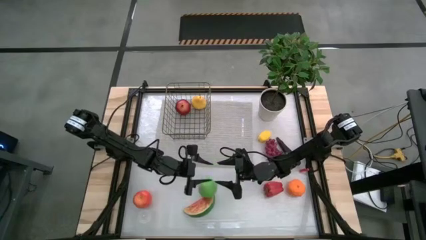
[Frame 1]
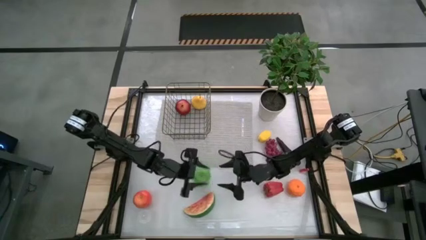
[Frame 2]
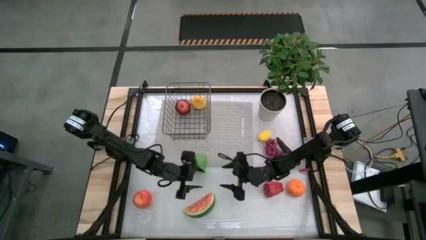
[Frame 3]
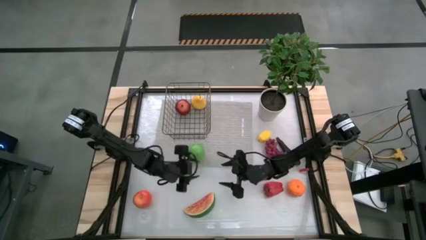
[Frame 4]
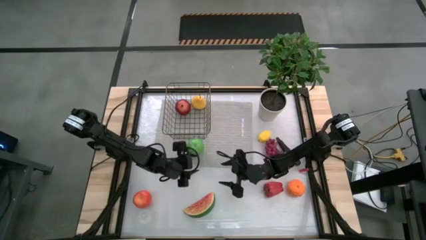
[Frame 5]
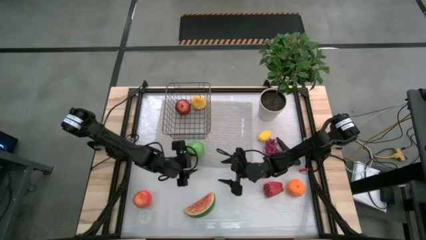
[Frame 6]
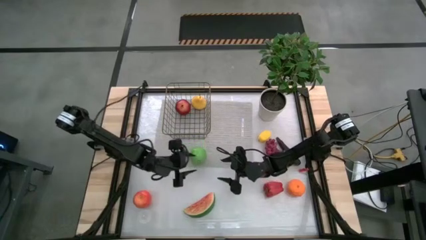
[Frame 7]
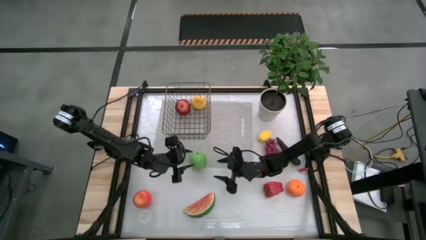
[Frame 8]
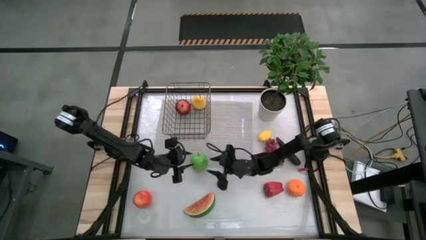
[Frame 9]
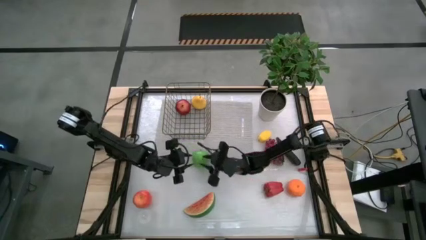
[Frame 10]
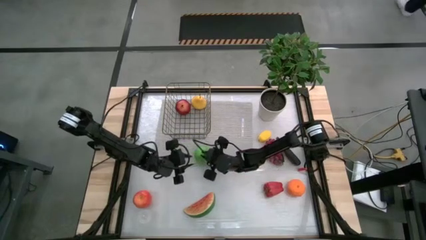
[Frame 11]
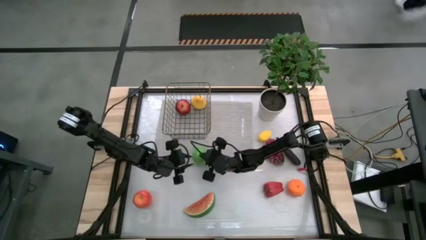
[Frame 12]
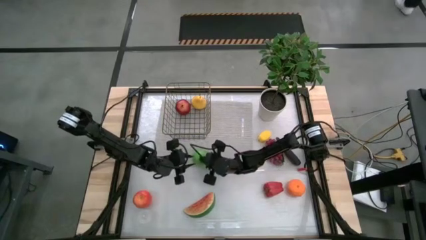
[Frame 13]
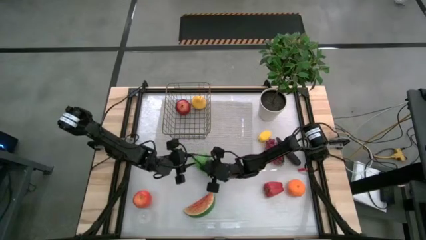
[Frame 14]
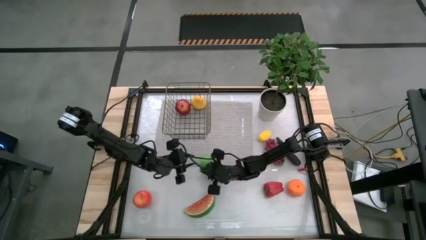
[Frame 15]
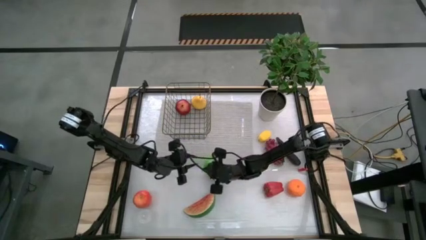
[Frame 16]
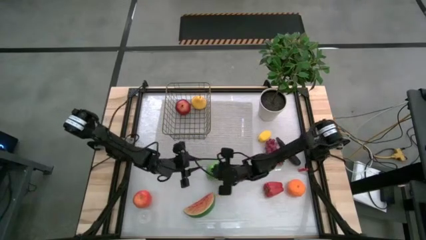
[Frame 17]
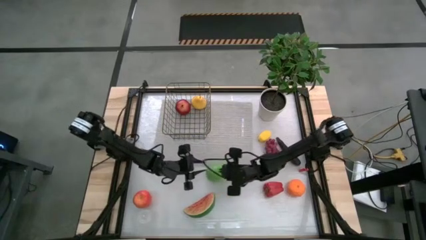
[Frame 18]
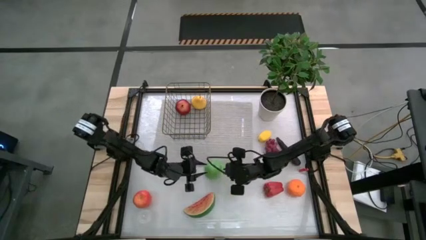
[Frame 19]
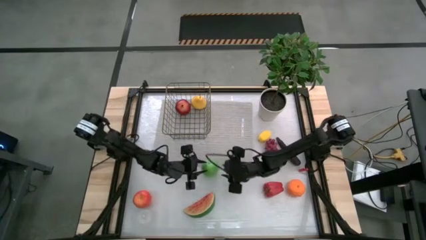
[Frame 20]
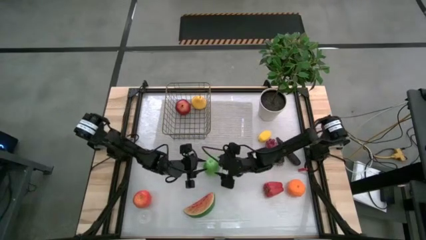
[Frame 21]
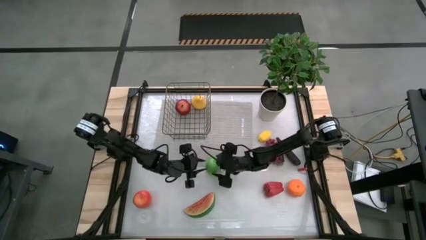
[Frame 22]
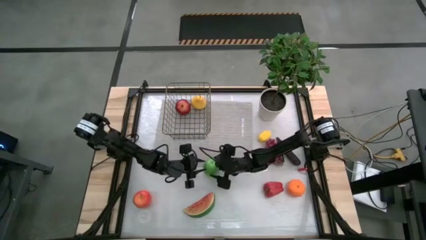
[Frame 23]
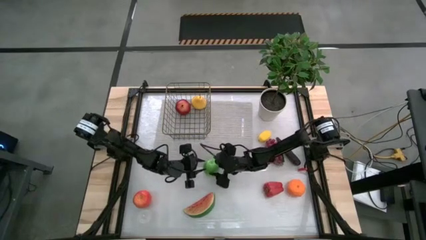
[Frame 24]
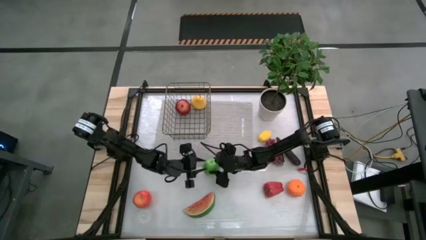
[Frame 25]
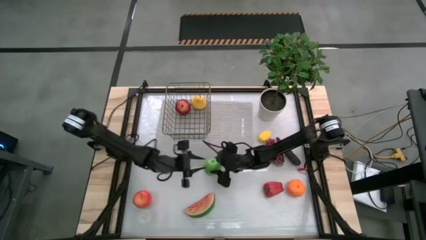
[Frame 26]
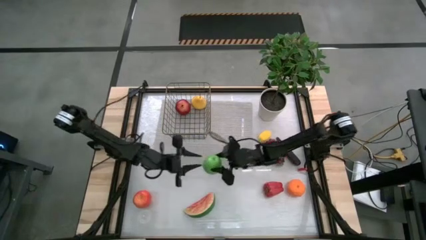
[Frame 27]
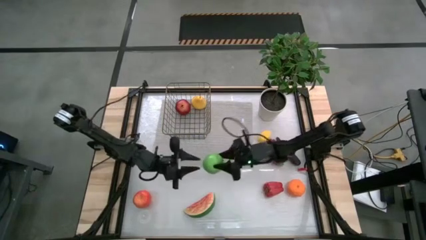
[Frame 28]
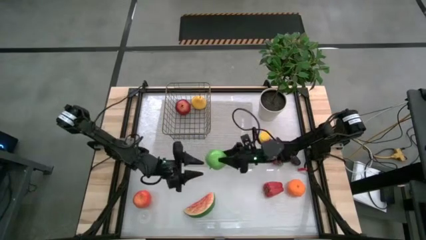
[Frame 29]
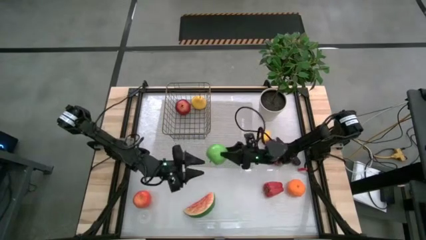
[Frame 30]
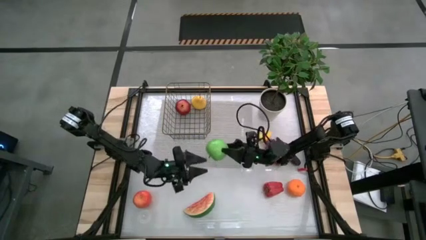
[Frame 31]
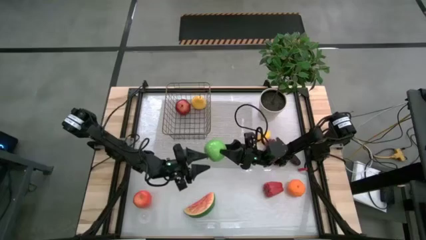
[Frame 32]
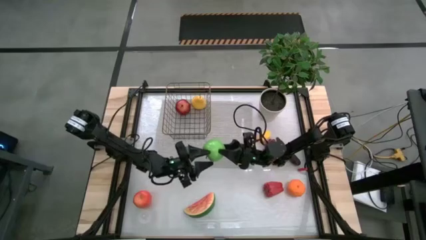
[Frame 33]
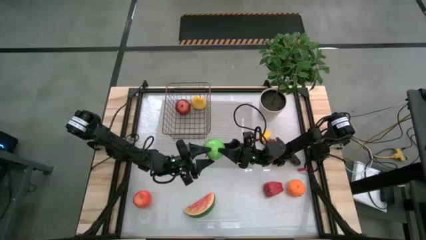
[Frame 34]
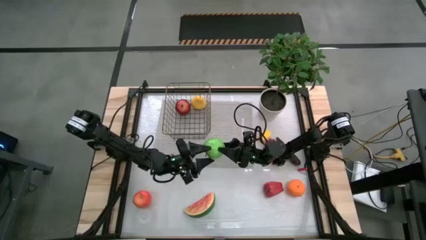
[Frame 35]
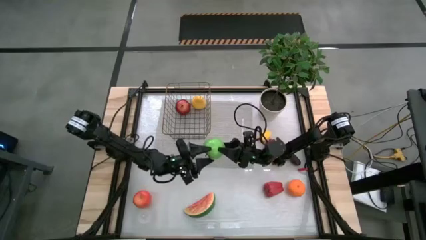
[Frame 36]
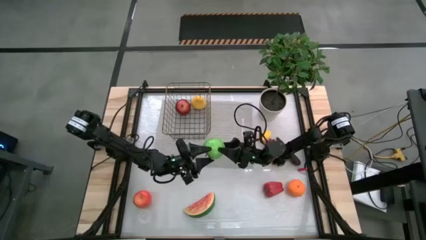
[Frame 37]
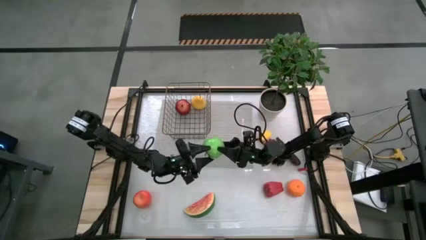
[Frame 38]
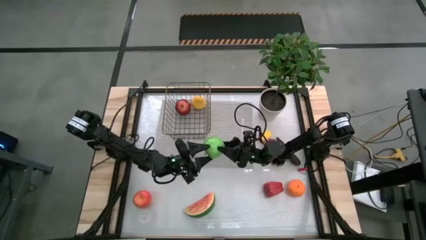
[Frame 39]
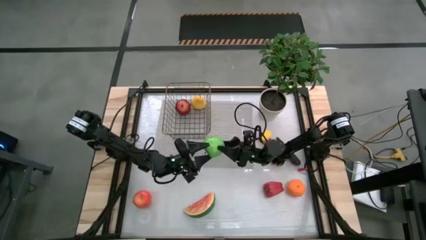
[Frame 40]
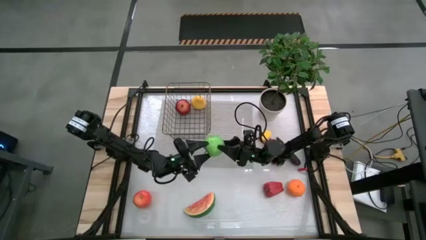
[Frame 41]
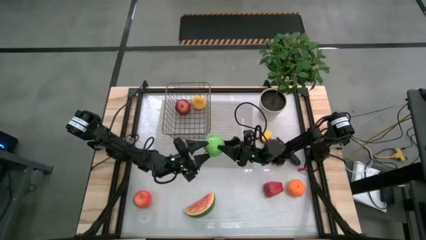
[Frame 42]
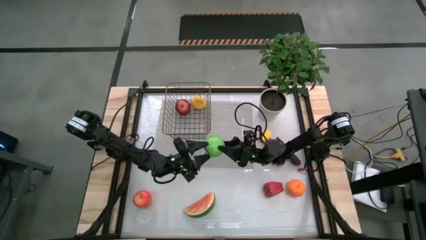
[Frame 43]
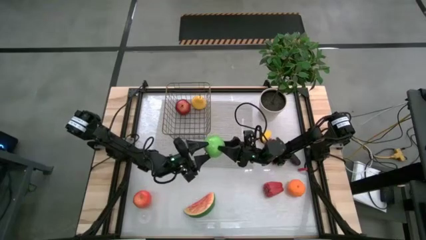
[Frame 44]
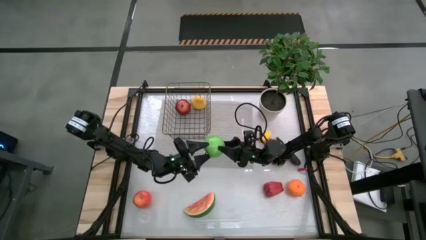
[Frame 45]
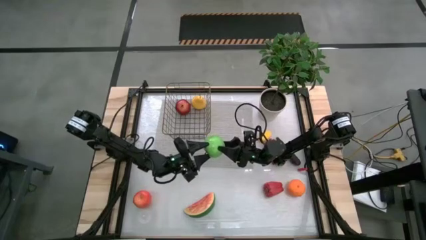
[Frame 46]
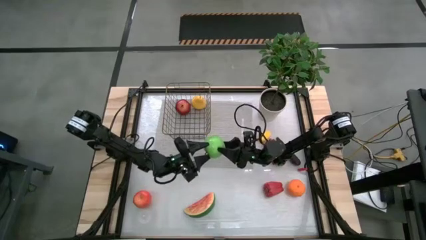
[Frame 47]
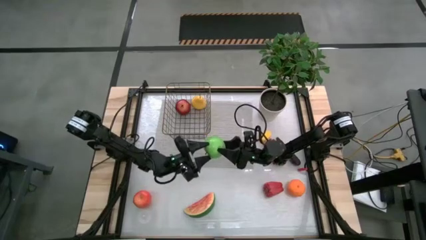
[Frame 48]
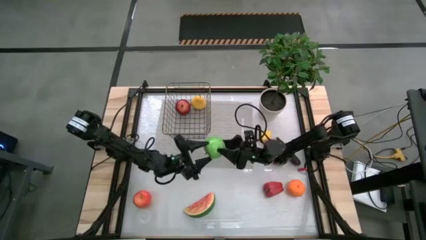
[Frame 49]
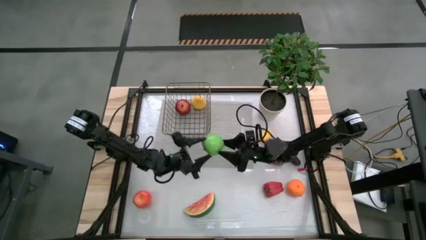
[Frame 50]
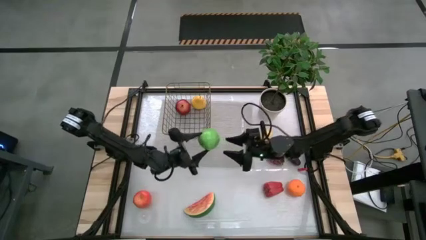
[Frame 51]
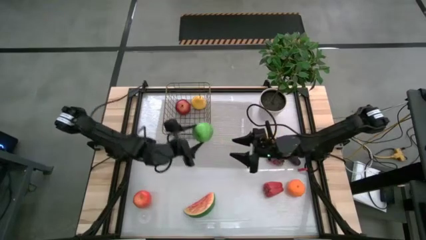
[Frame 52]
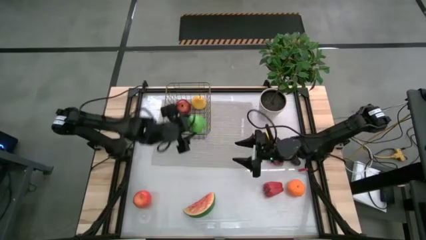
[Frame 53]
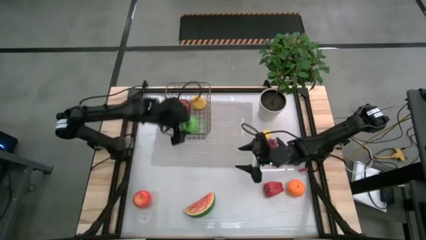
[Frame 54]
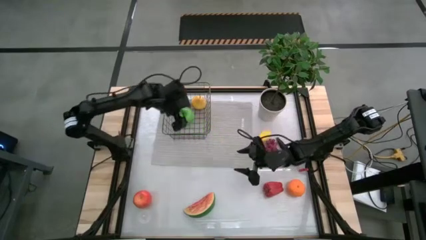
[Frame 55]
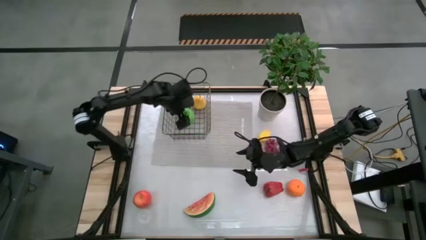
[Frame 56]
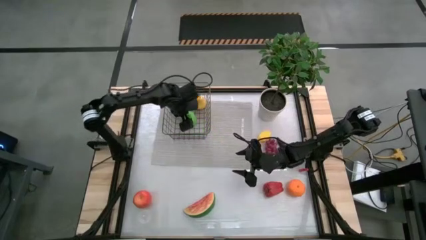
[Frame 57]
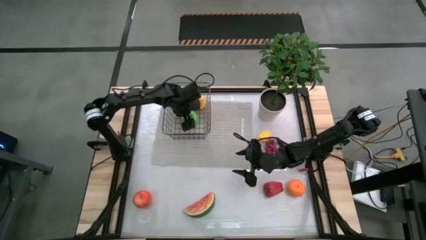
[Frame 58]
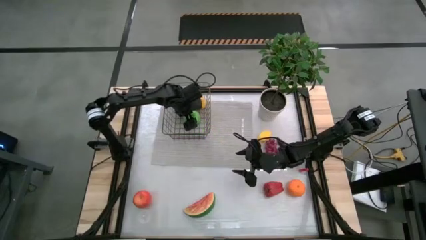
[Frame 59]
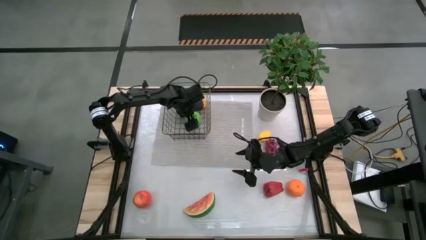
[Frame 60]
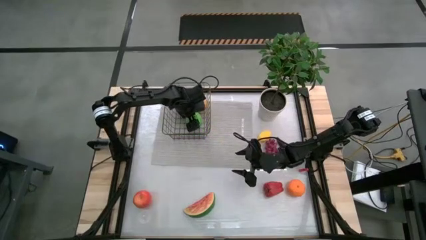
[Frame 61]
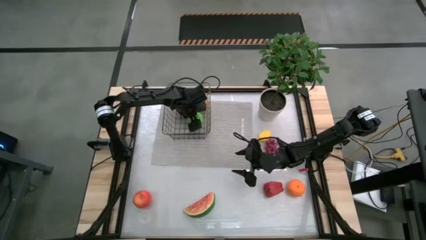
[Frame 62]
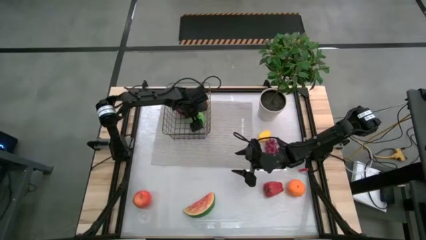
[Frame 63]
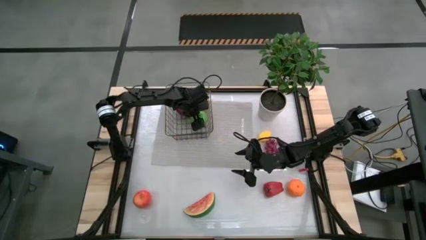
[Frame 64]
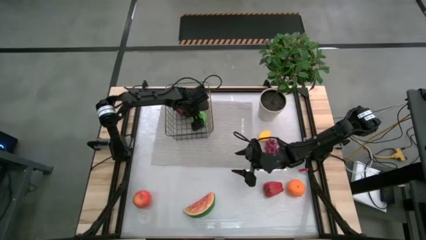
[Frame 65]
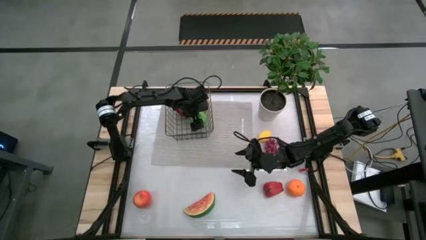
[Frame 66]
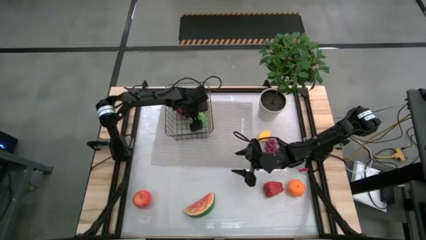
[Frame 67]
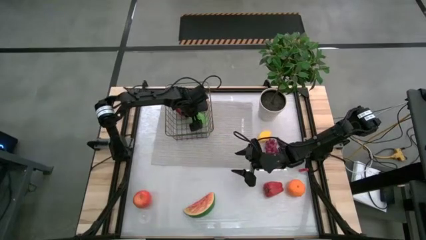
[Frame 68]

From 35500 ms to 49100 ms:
Task: Build produce basket
Put the green apple into the brown wire basket

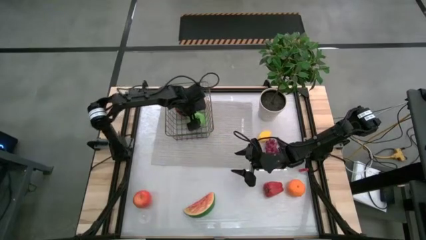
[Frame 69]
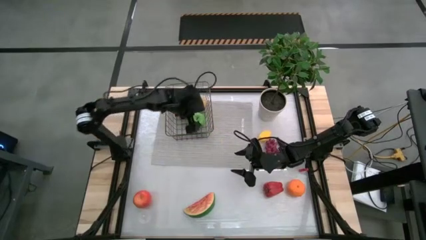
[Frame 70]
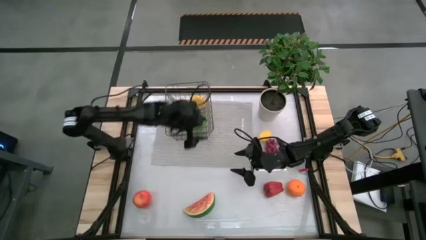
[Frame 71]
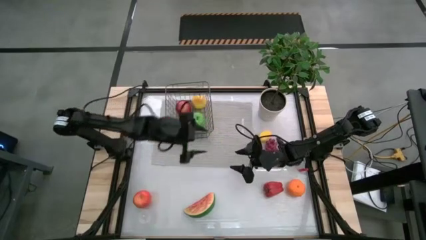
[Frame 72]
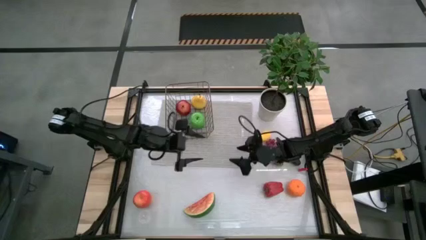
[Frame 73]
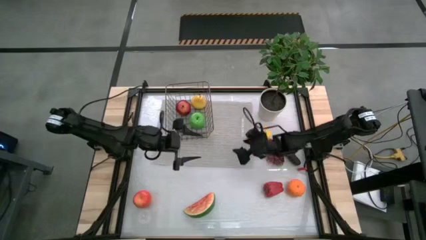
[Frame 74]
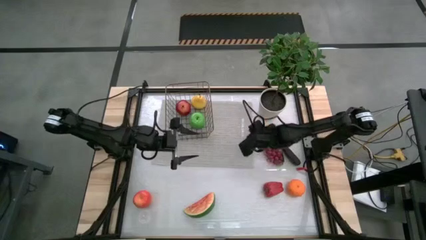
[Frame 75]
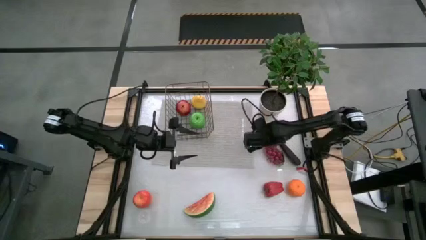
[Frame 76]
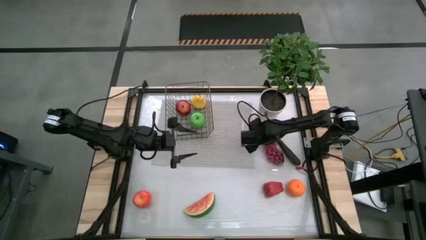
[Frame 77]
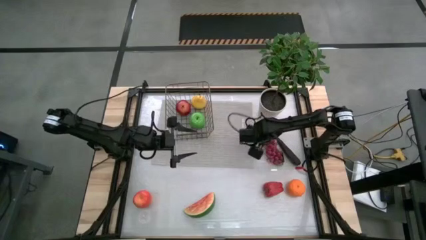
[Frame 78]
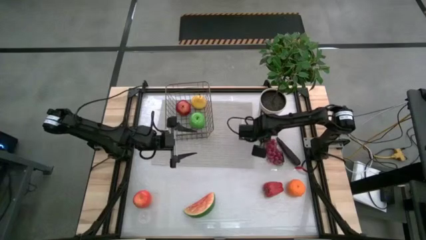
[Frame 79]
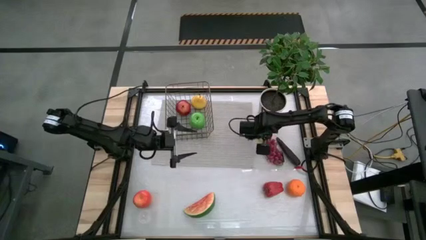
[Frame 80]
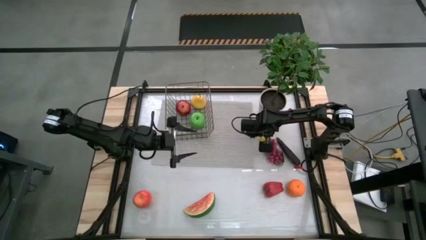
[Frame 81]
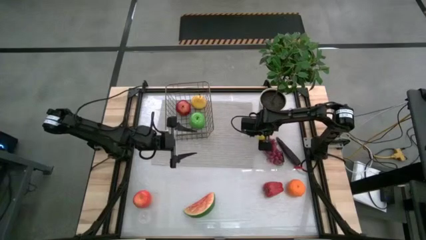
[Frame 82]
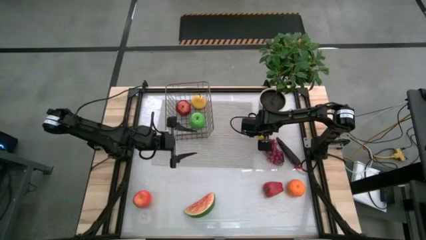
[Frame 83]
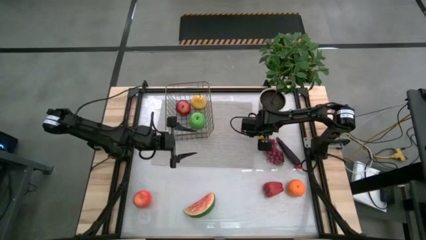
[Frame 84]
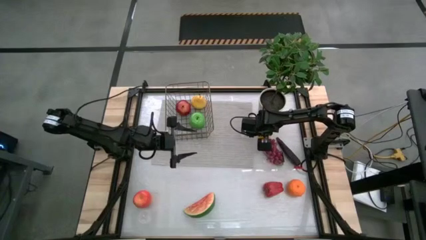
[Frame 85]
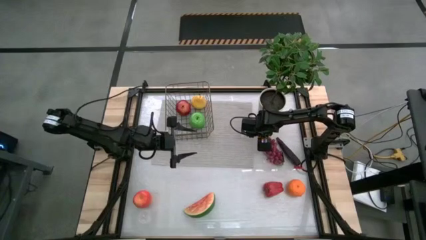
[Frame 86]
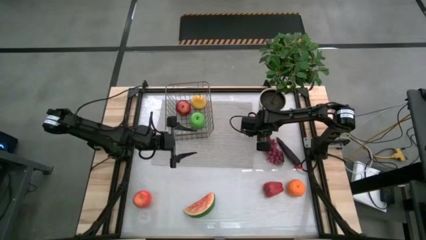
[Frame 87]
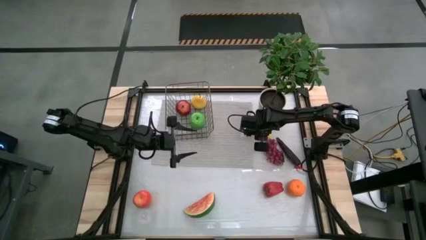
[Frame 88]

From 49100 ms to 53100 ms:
Put the yellow lemon into the brown wire basket
